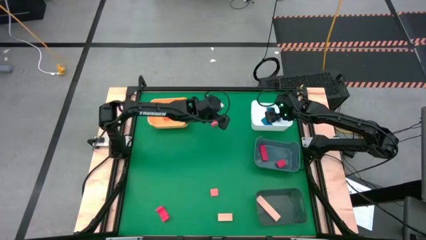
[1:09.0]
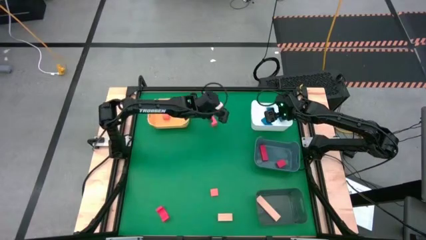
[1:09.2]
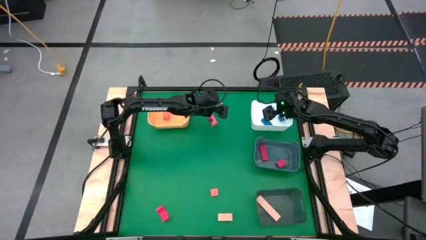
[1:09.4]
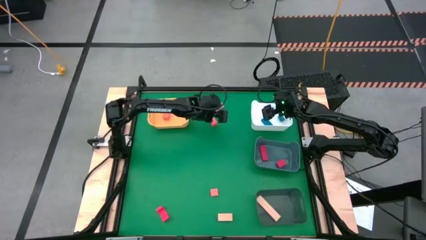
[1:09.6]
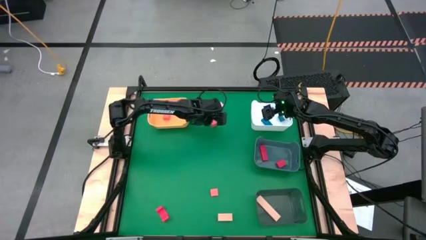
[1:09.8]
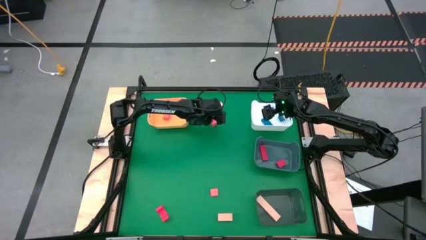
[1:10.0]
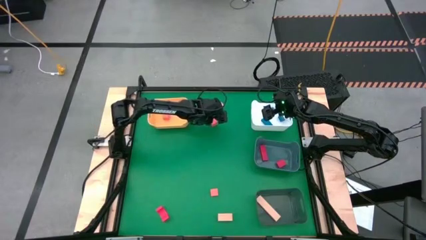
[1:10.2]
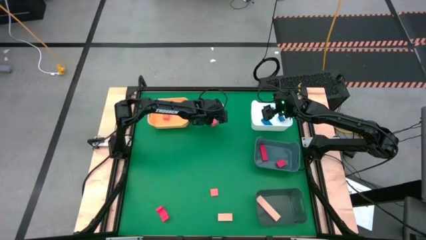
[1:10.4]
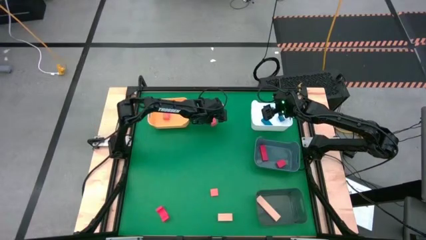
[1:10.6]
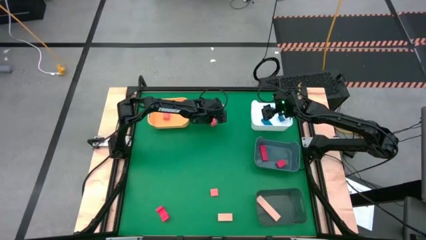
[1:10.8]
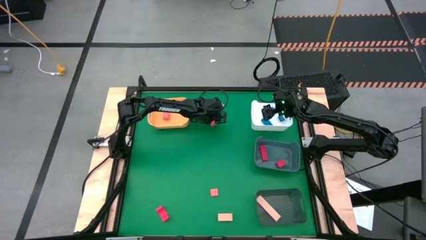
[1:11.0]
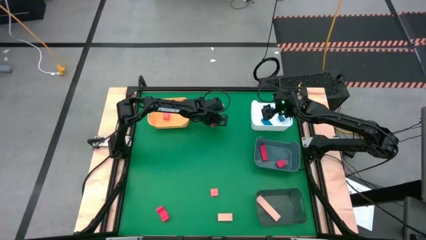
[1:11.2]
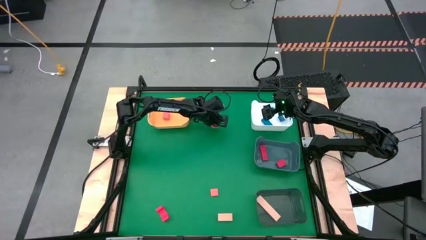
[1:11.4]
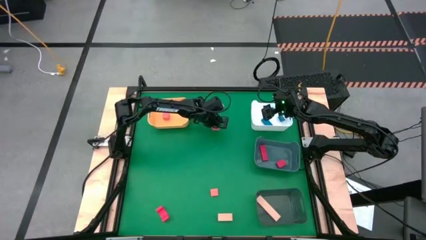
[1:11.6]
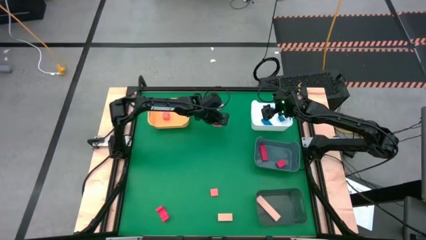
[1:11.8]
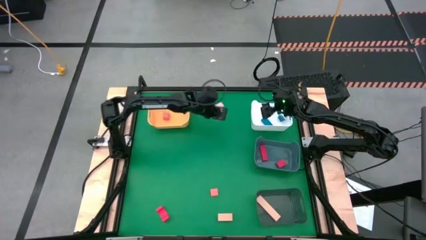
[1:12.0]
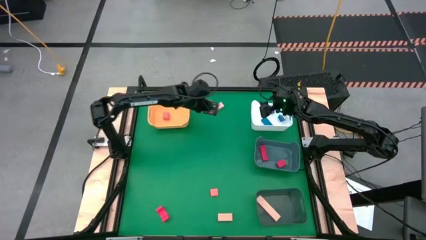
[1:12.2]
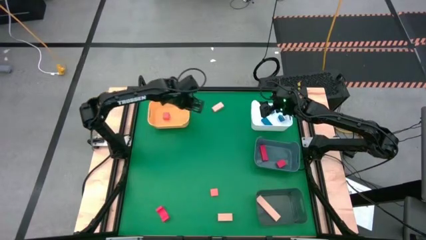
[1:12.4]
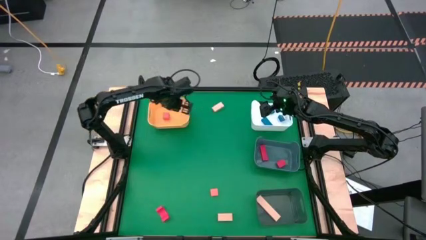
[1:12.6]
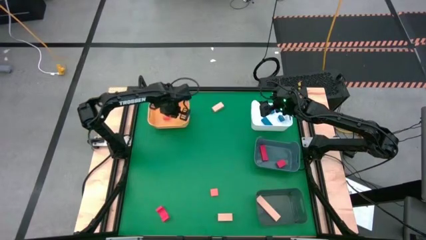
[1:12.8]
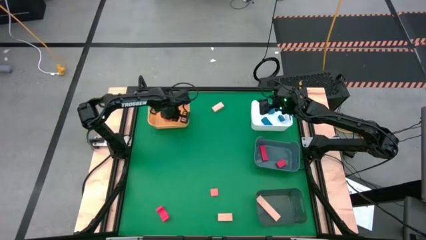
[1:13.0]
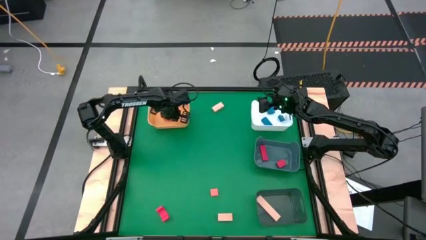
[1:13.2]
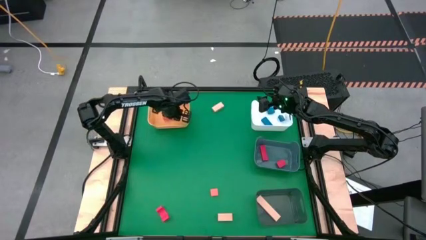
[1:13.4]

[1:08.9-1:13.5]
Task: Sort & place blocks by color
Put the top orange block into the yellow bin

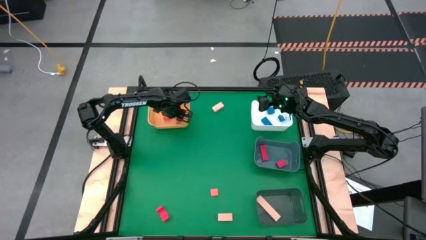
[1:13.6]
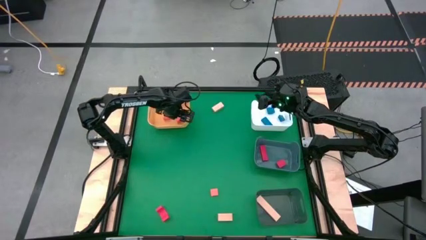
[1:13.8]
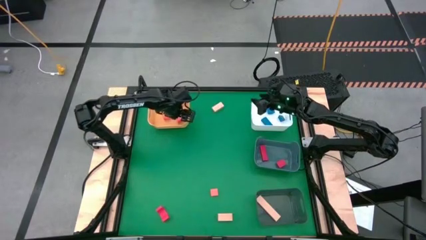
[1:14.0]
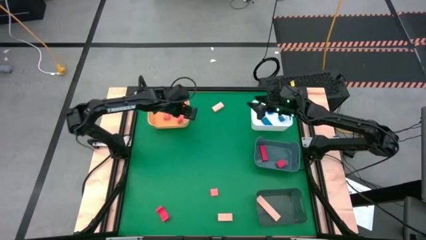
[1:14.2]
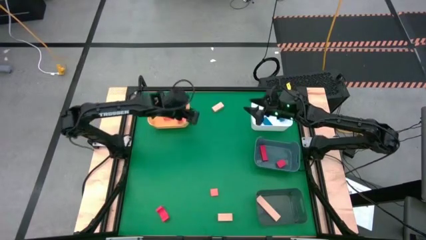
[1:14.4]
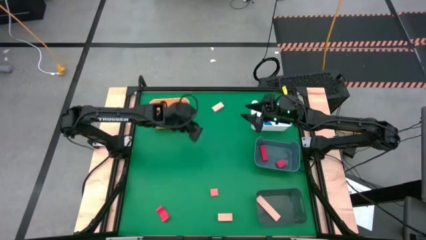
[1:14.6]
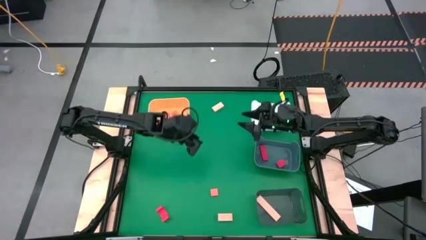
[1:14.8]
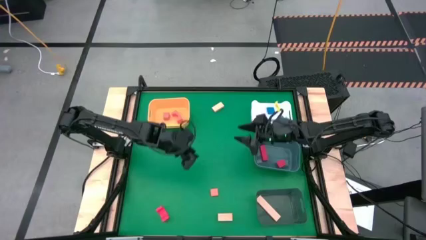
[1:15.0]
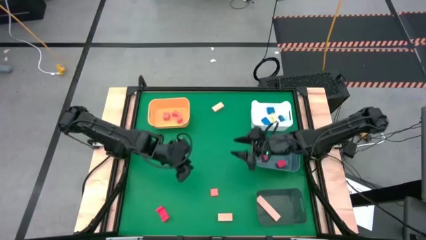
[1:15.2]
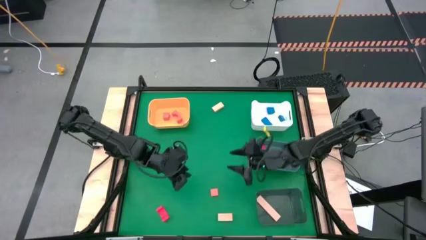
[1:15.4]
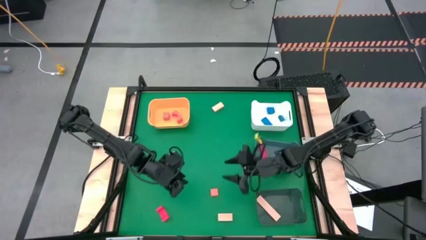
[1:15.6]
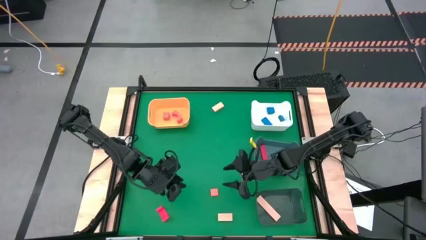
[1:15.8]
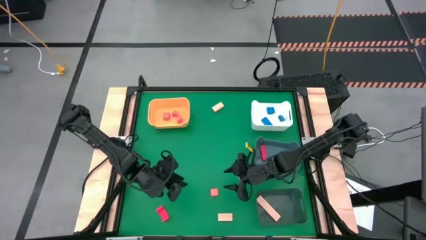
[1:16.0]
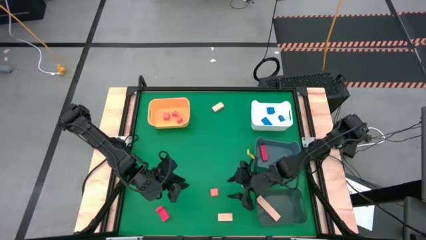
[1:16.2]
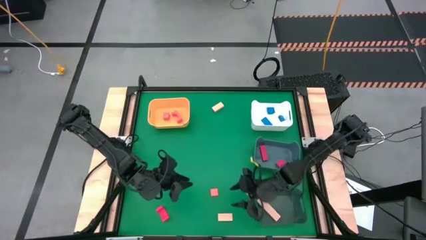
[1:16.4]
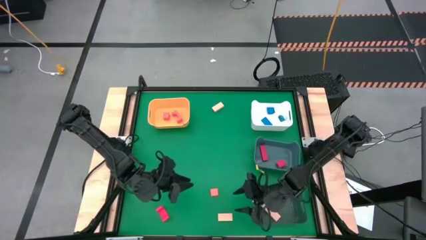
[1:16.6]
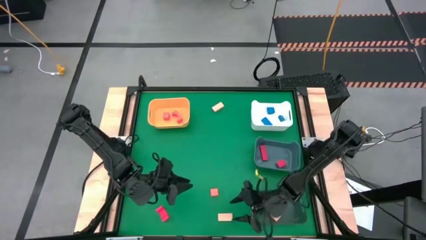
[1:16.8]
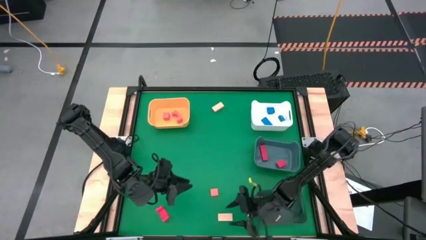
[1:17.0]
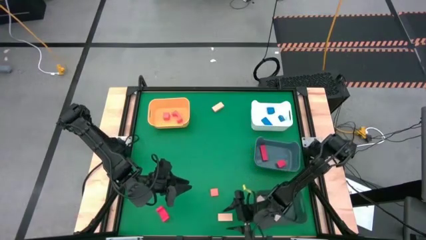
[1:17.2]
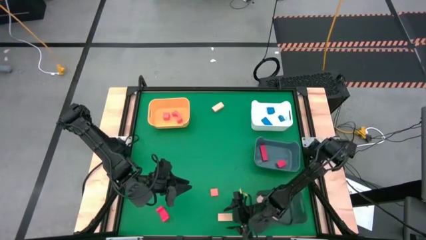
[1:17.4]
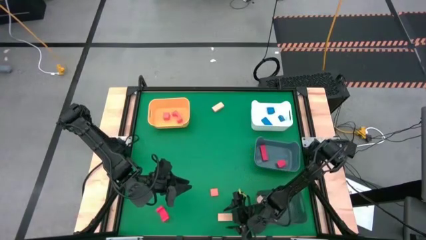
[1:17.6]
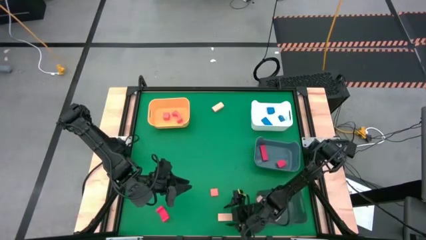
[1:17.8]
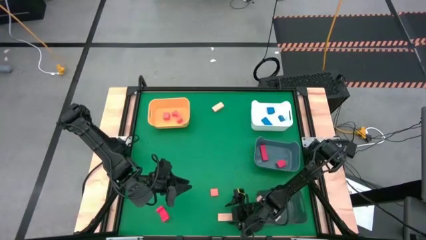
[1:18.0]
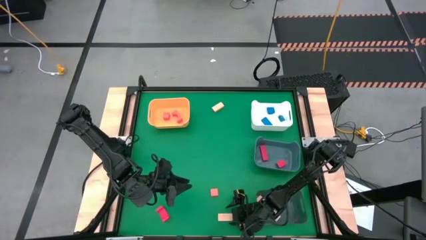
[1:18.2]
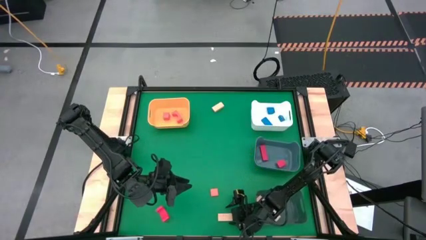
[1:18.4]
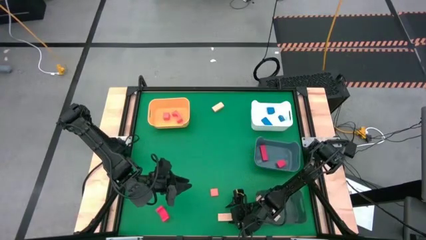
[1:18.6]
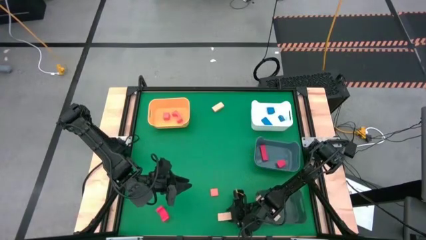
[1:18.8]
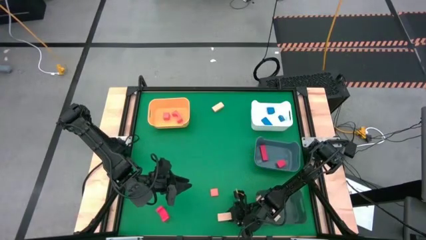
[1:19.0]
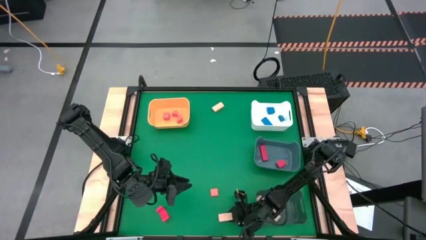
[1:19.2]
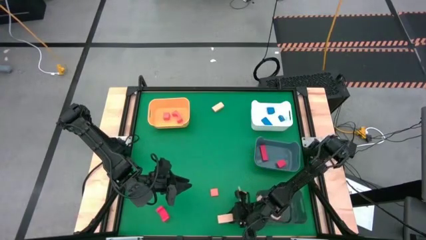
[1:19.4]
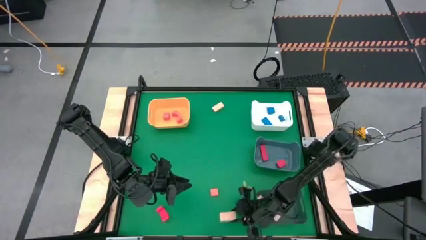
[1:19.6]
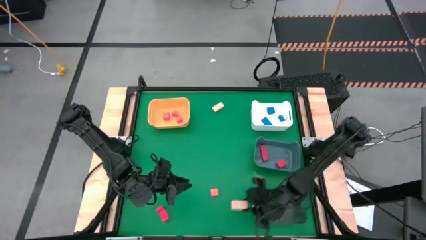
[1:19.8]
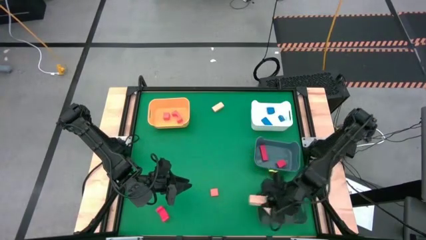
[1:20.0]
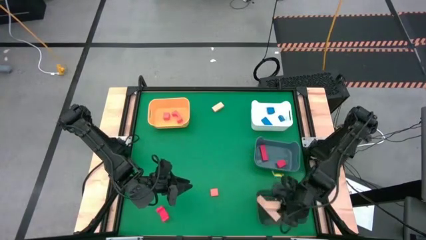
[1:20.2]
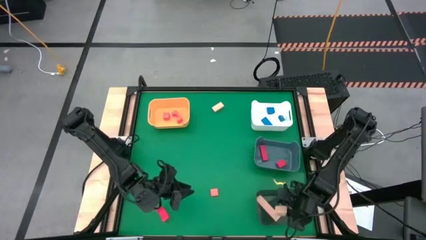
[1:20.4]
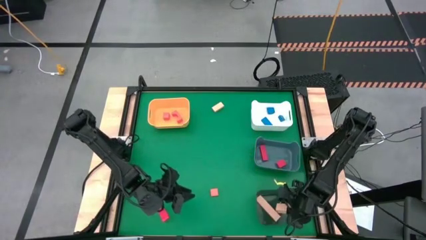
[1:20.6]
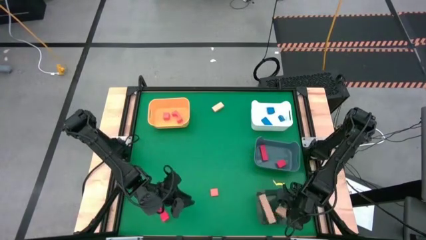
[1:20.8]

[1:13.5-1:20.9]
Put the bottom brown block into the black bin

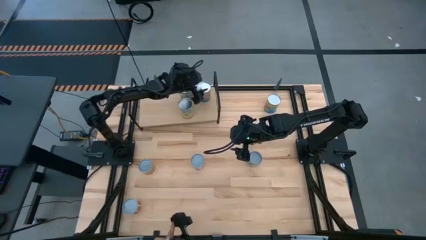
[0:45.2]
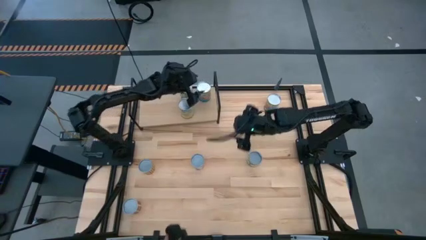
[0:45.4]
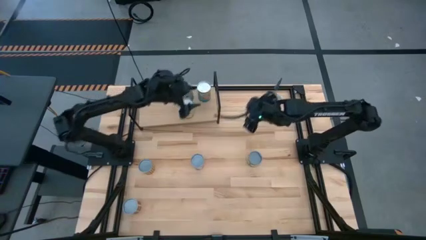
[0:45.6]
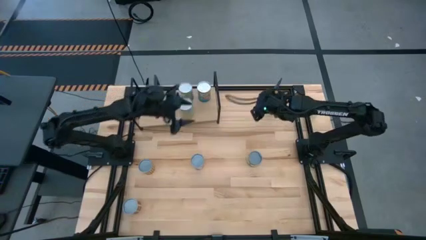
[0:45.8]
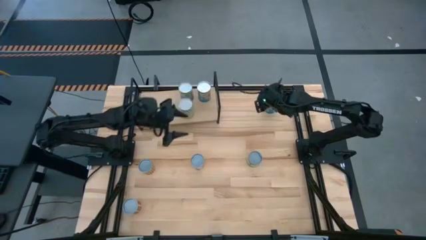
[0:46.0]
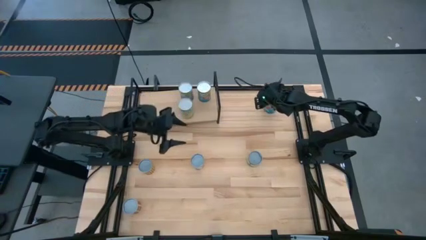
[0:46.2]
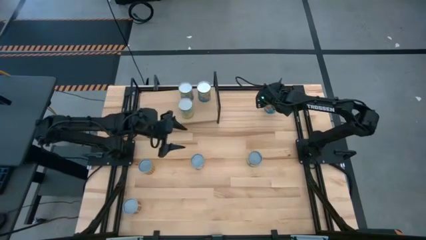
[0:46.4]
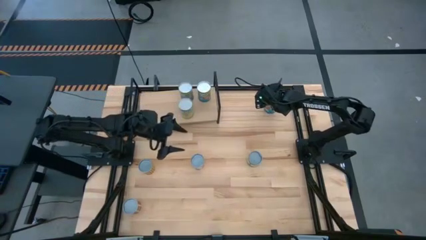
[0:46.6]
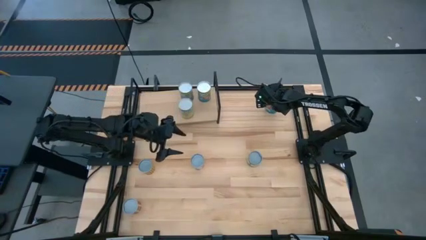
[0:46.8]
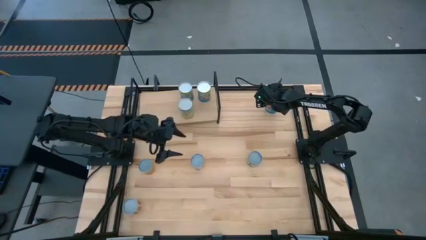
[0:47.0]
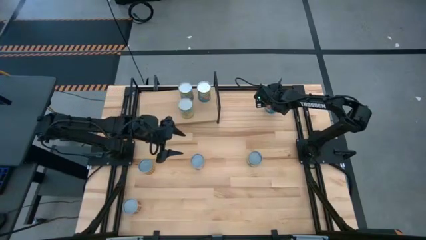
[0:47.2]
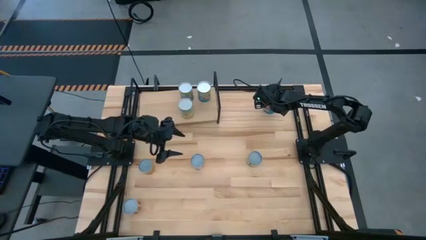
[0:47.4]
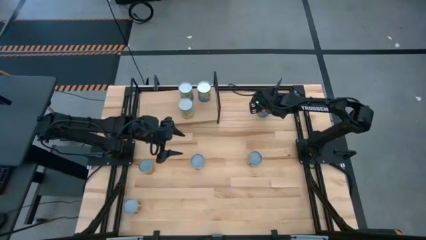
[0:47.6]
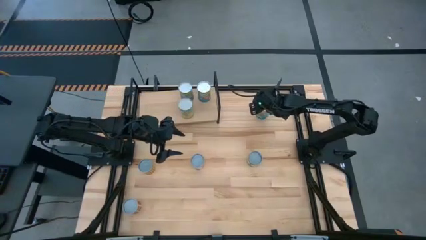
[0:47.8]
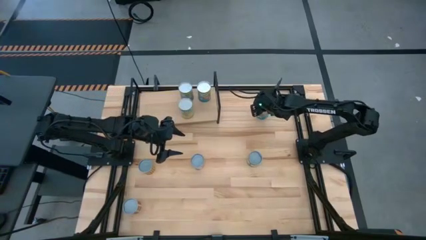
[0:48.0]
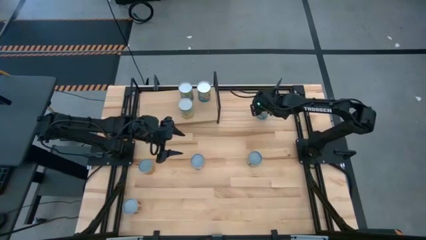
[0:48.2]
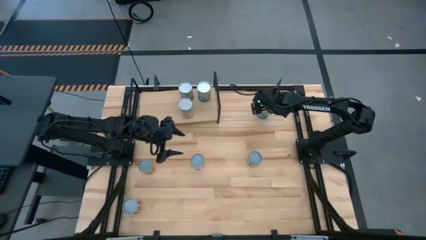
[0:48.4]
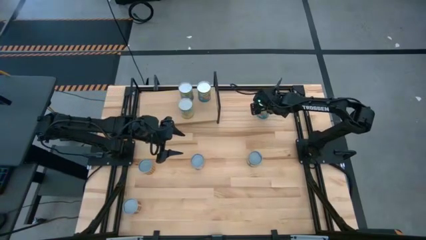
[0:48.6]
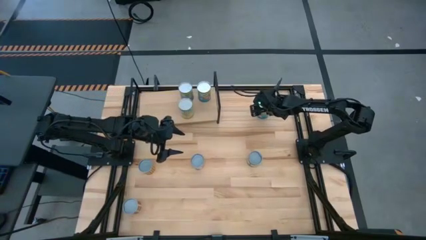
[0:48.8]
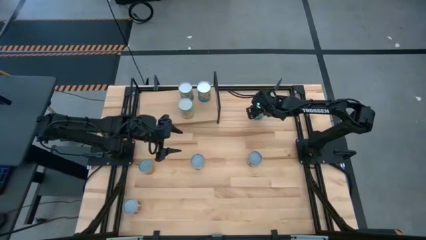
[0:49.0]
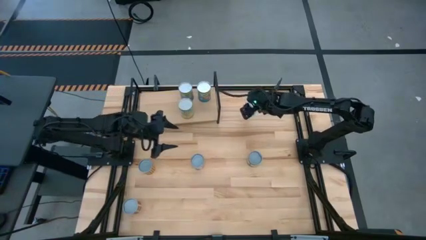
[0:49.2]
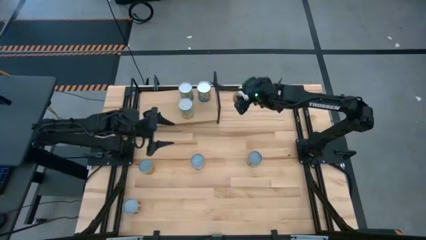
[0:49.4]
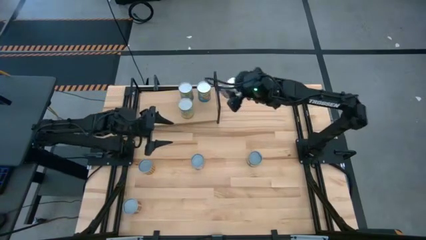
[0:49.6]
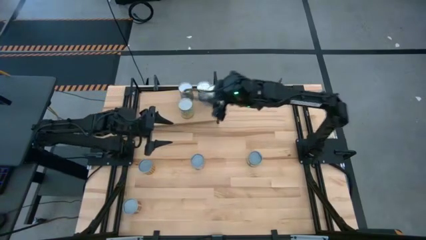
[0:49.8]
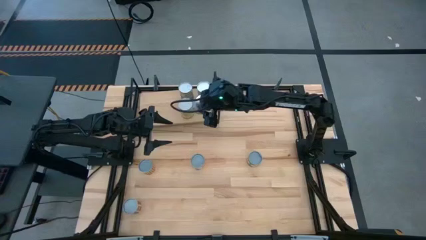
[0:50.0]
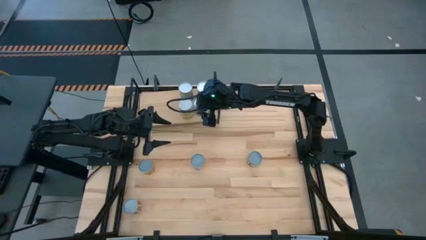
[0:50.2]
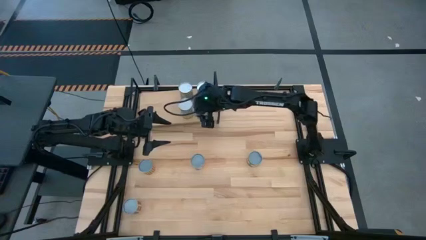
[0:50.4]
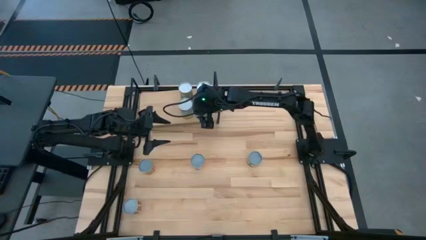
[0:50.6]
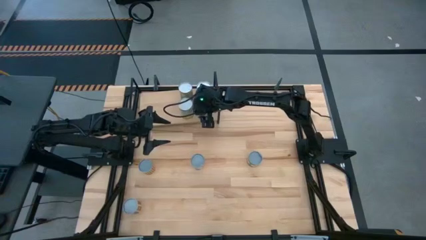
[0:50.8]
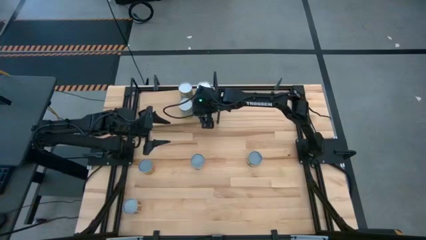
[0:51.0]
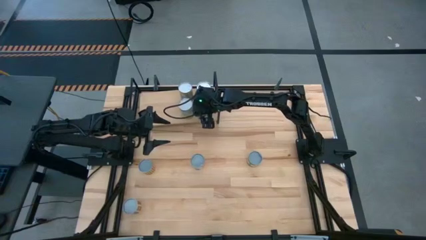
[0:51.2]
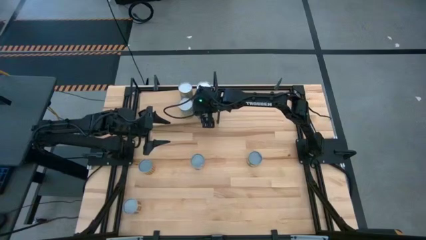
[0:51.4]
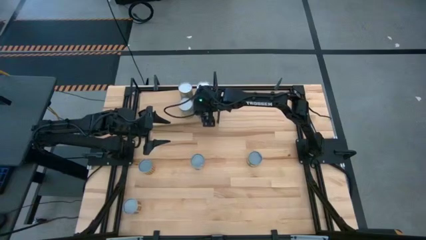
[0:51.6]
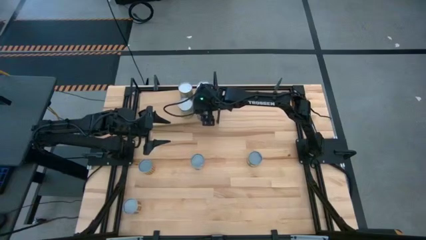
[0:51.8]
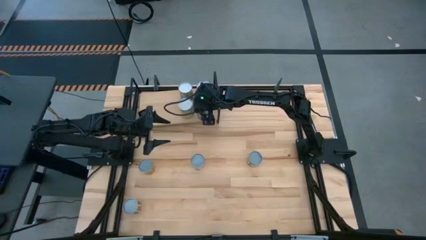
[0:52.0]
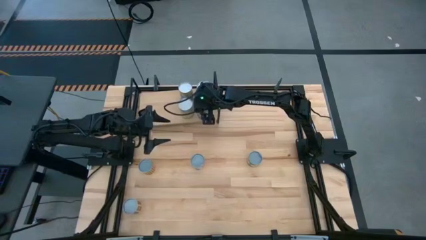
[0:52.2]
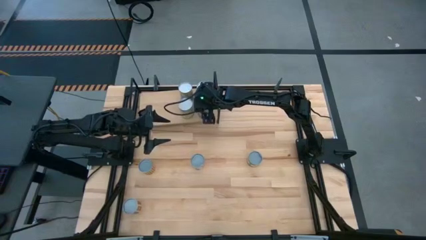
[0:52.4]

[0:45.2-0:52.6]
Task: Pick and place cans onto a shelf
Put the cannedned tomatoes on the shelf
